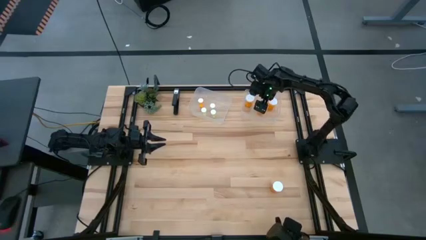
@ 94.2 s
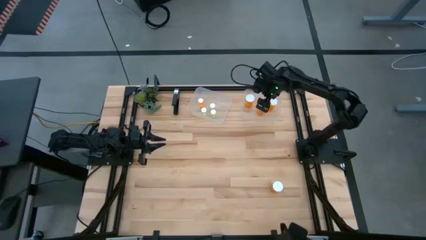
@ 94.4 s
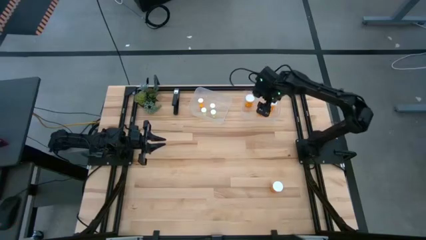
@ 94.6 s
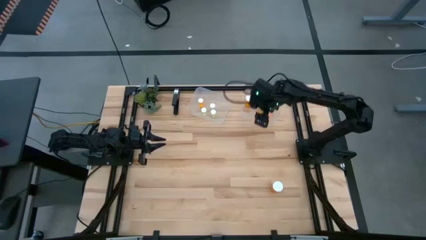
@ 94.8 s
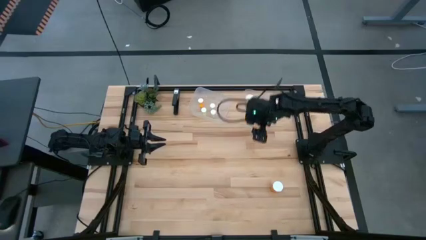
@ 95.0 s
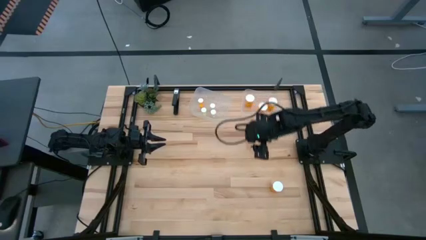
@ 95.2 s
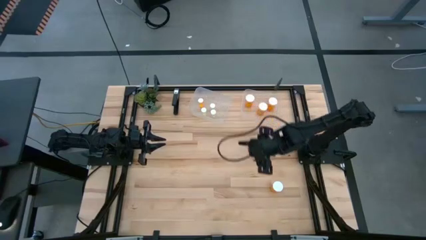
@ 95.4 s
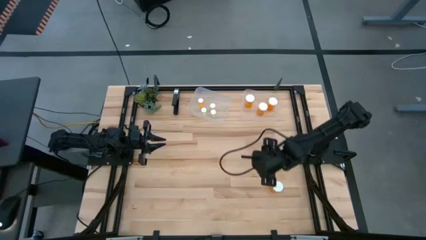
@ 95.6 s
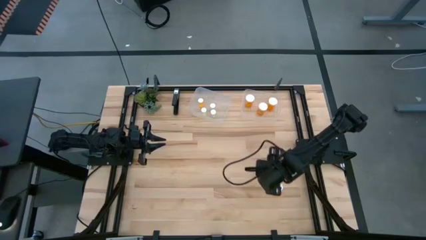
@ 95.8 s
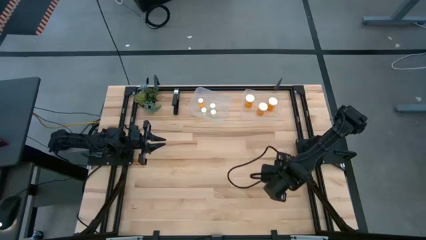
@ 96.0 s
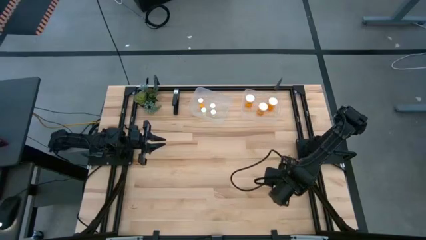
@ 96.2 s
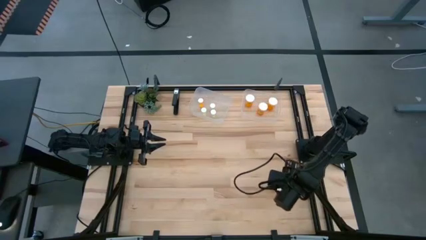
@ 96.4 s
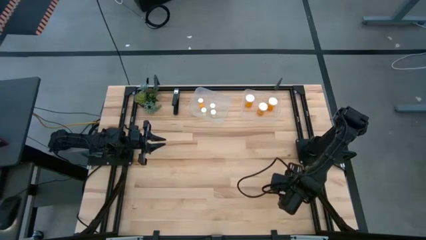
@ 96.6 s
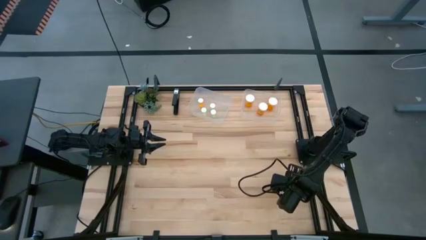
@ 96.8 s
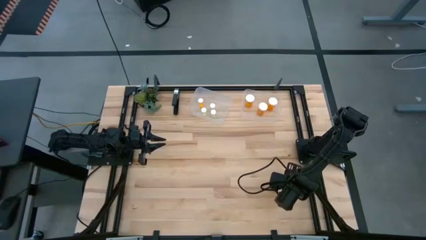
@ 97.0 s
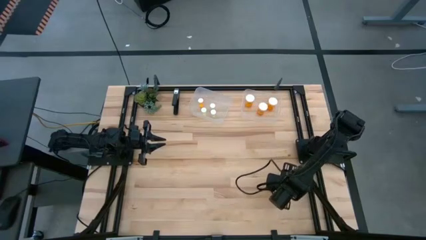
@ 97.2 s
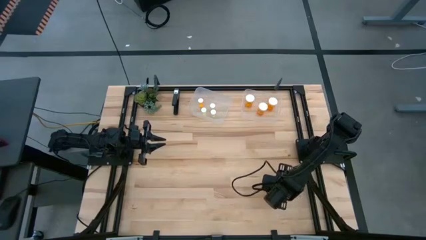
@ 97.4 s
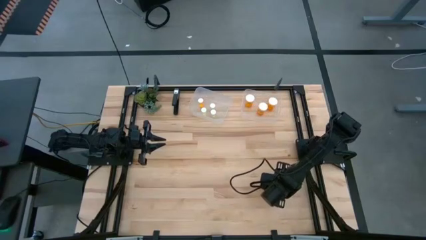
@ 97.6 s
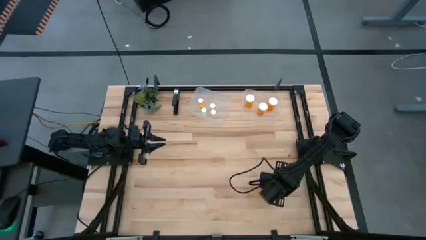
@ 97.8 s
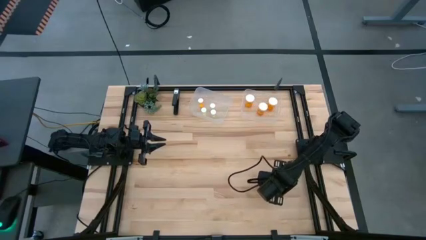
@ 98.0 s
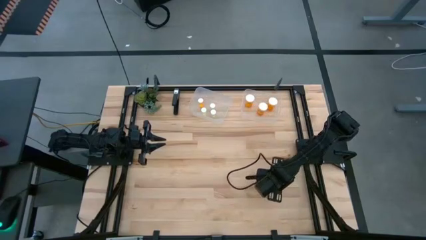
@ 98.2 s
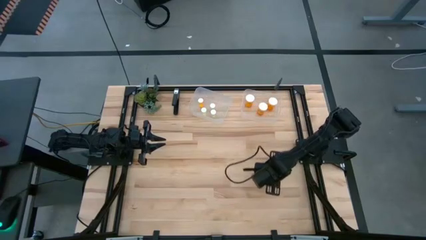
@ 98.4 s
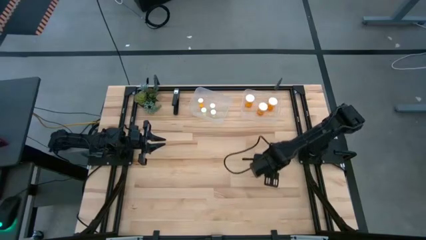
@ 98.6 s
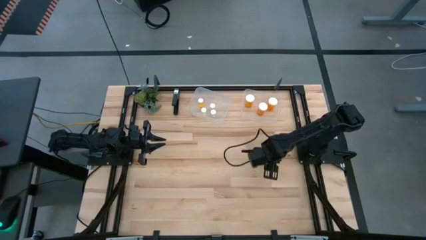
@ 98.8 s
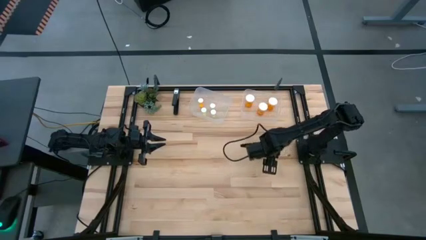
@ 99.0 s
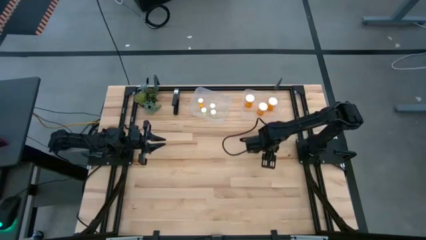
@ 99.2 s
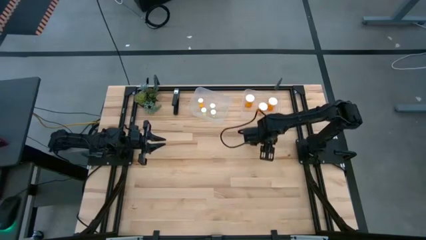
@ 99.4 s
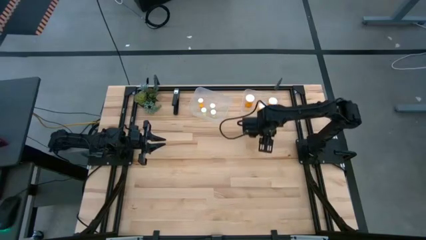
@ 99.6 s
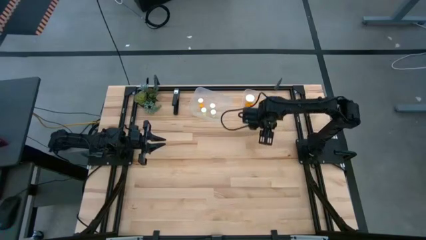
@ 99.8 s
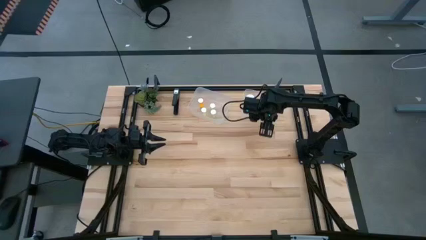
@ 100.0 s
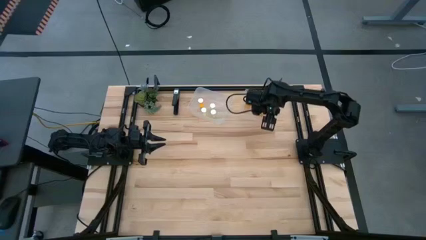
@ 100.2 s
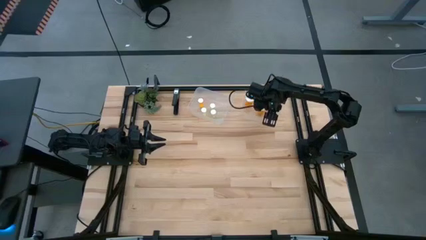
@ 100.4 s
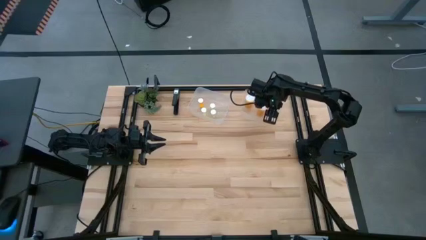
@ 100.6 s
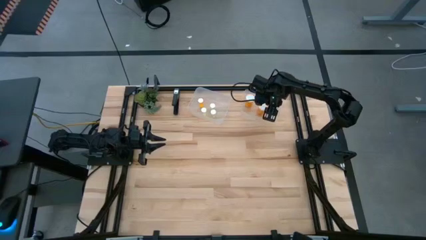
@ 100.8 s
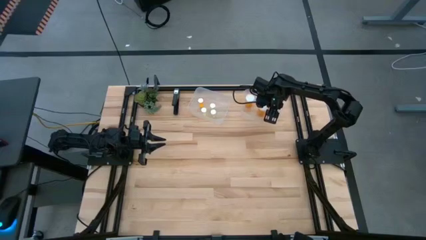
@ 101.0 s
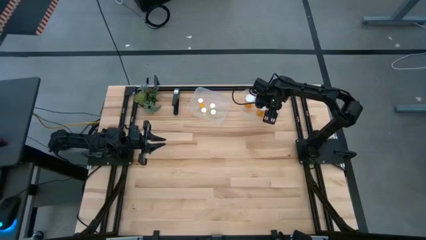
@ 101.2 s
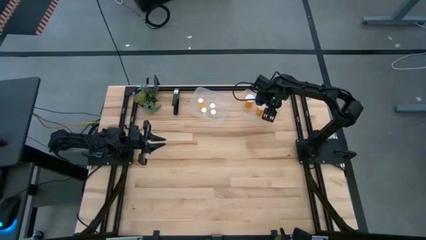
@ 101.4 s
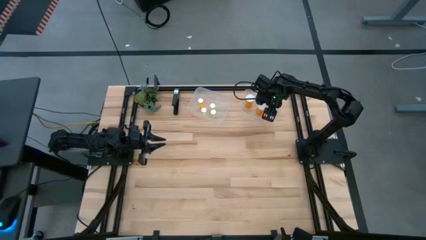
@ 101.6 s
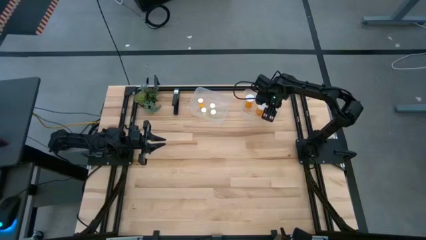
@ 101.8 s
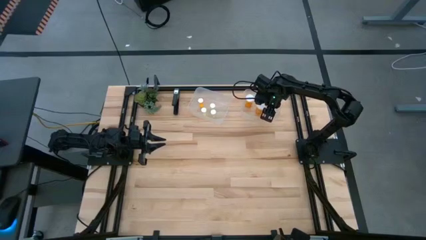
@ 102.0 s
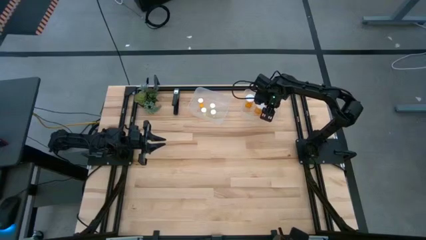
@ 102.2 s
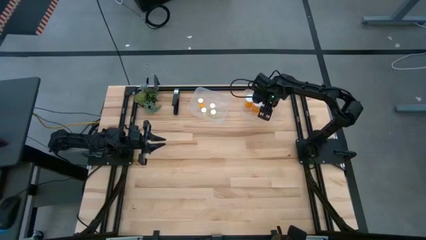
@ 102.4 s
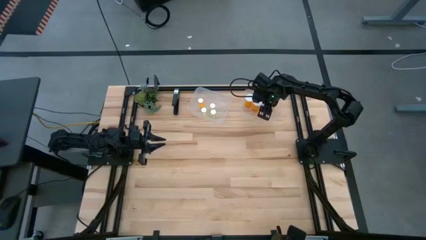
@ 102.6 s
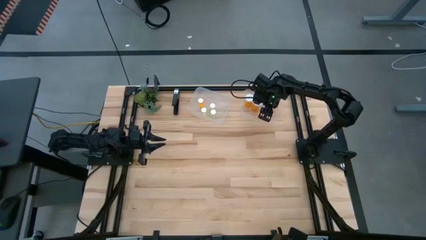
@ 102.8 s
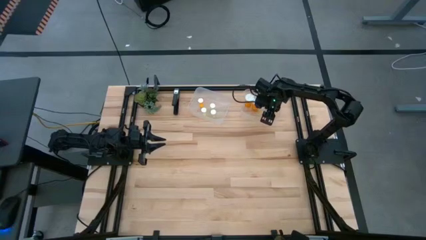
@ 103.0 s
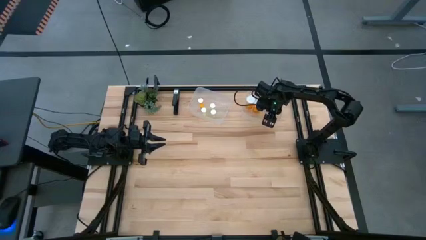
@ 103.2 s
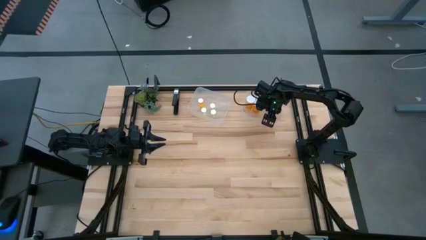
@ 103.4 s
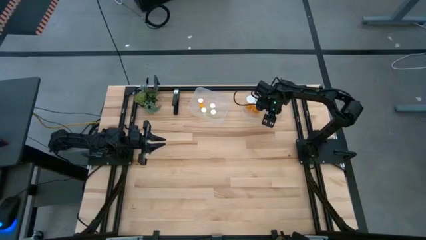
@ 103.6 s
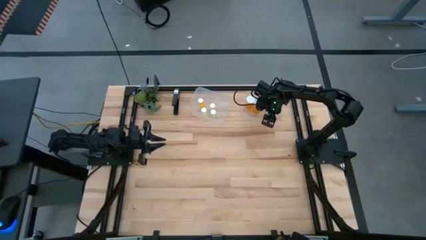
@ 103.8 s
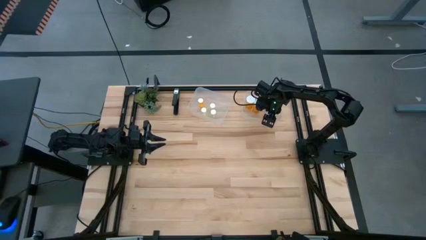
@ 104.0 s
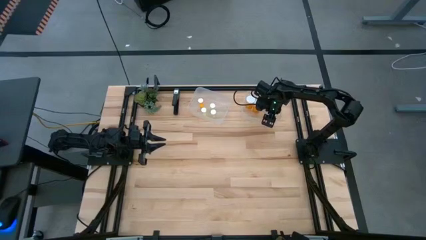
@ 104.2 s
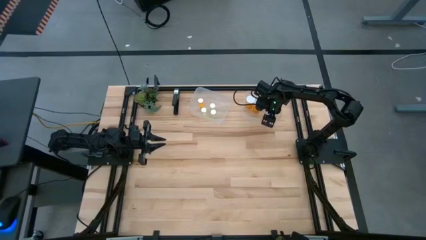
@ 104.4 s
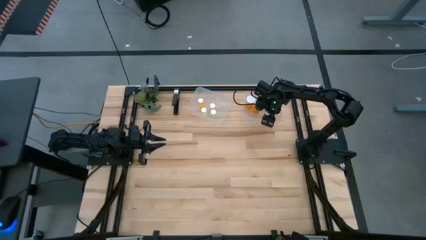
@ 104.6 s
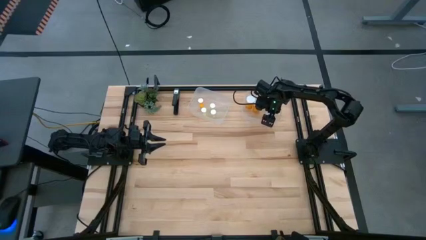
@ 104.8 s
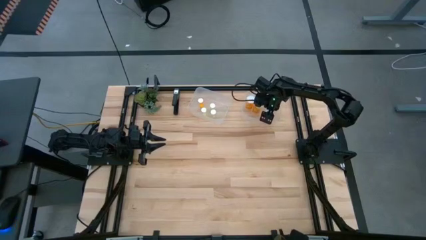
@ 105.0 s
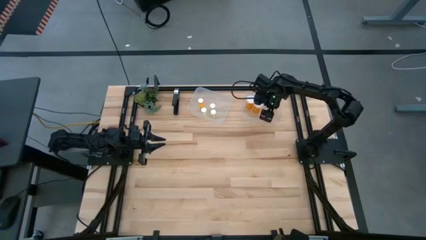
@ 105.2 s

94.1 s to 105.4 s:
Task: Pick and place medicine bottles into bin by pill shape (circle, oval)
Put the big orange pill bottle into the right transparent bin

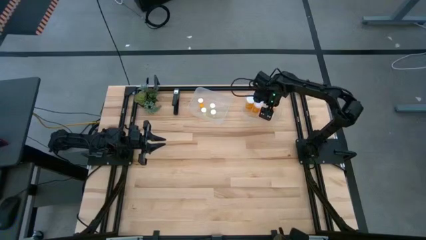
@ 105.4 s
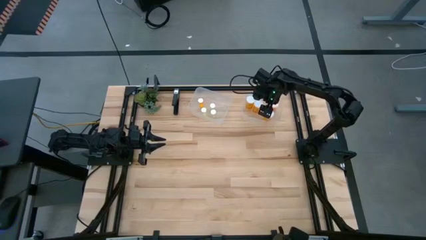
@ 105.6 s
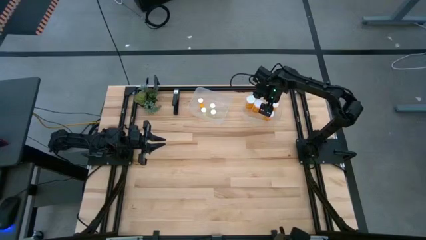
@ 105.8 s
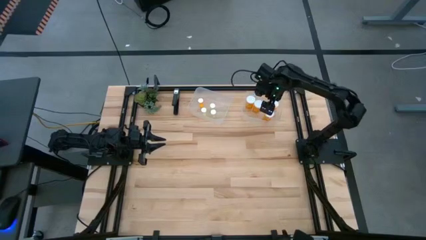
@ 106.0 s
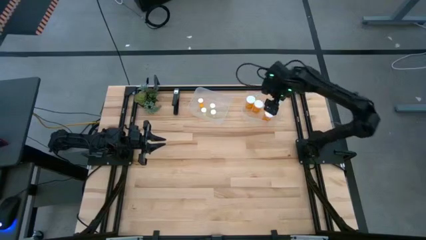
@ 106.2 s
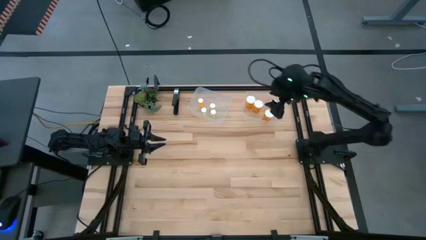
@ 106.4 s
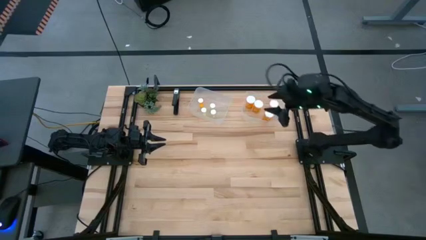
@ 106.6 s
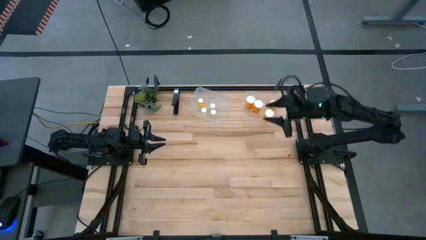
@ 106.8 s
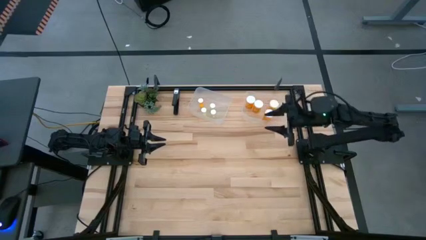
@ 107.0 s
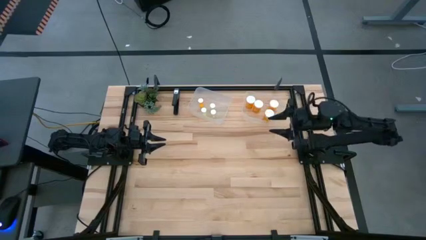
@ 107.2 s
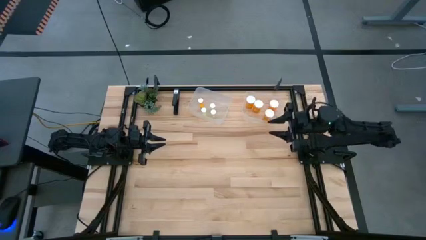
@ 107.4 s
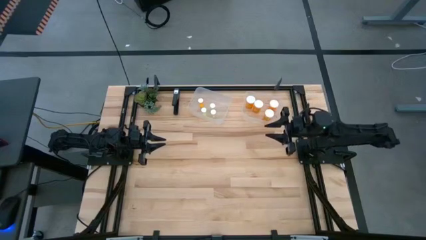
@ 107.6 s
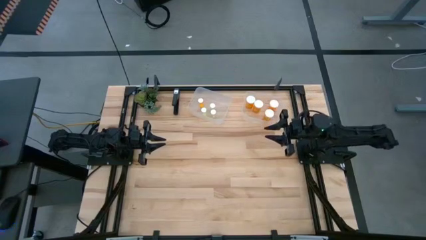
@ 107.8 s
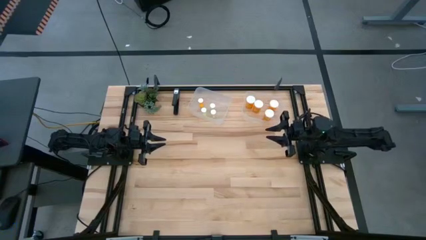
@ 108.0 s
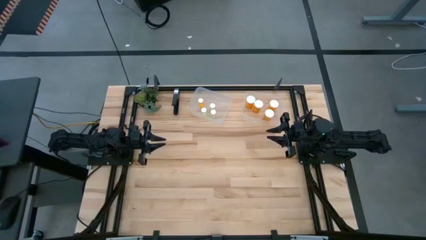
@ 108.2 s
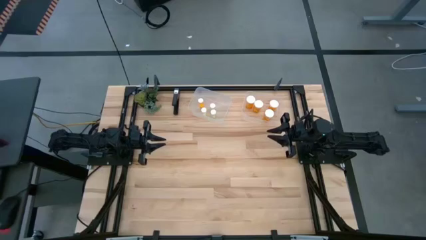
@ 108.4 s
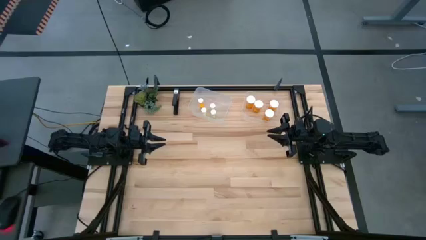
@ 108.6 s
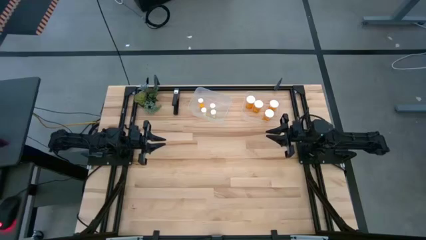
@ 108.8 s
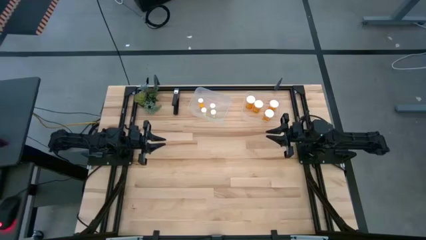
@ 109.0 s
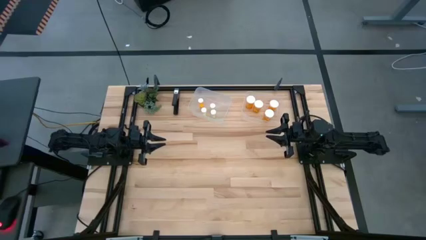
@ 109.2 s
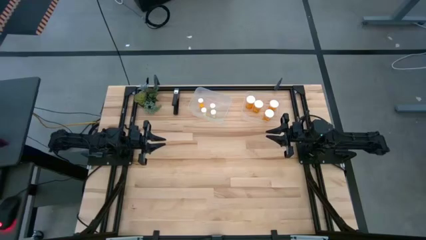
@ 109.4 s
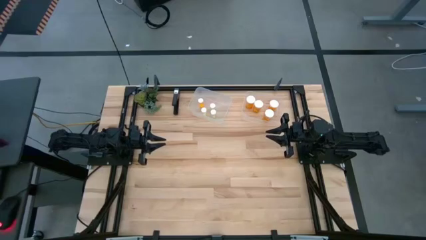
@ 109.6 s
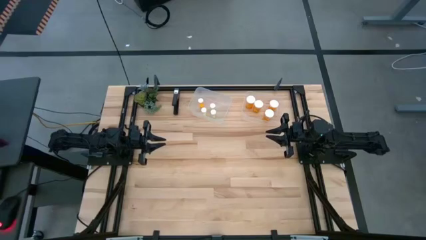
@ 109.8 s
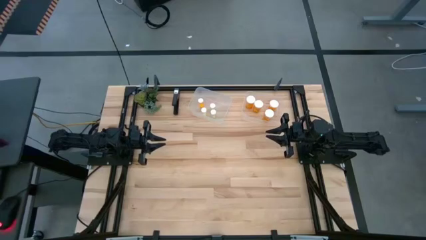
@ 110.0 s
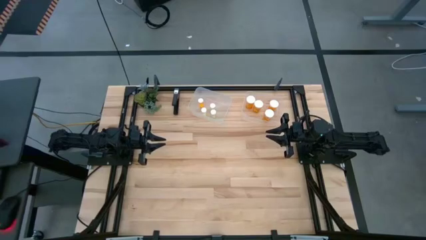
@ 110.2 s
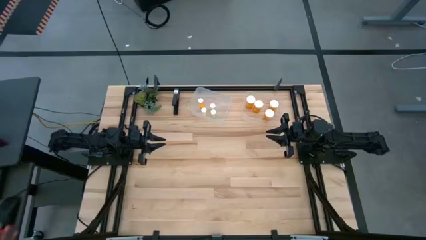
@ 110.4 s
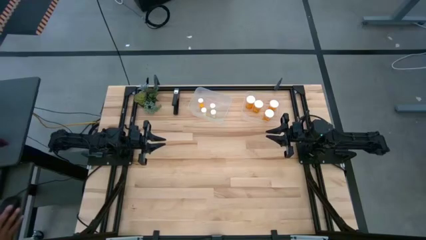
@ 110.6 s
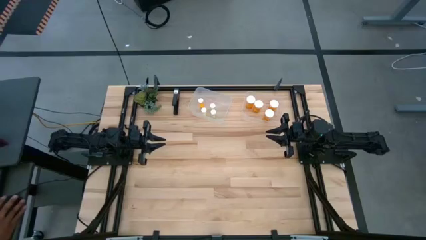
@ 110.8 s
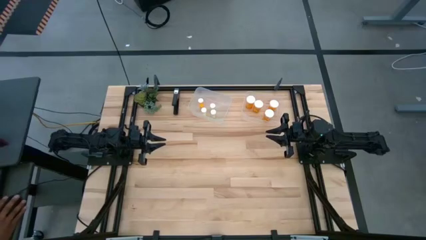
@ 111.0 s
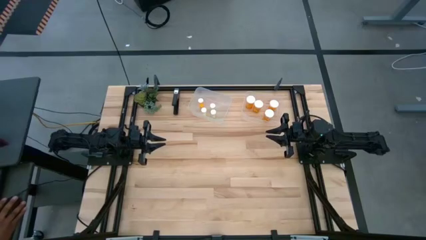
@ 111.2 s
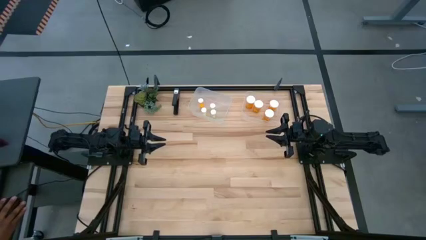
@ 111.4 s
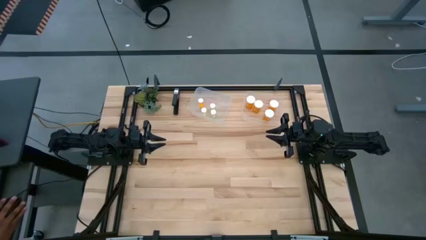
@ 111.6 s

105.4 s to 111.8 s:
Return to Home Position
